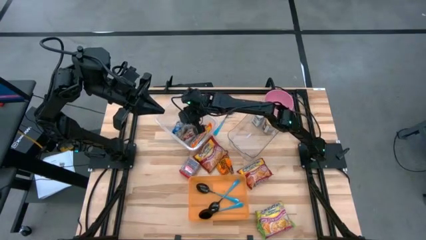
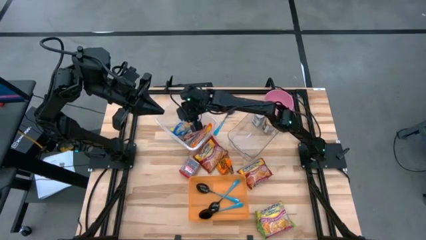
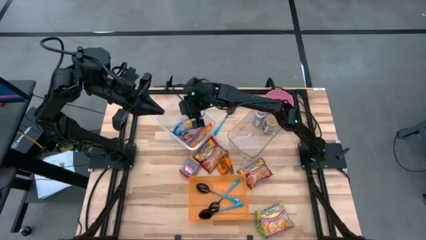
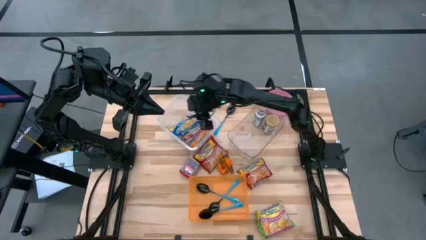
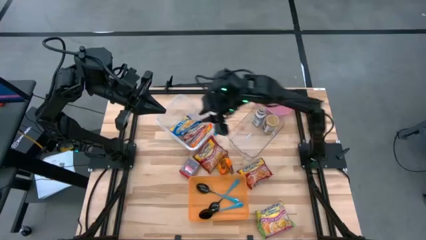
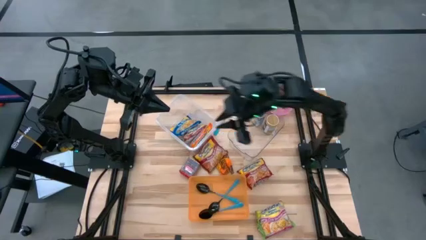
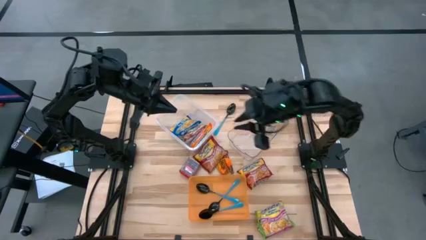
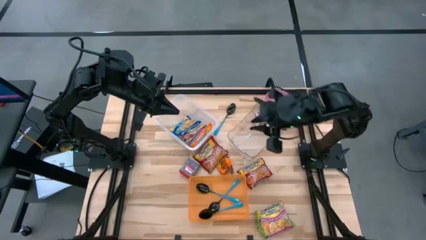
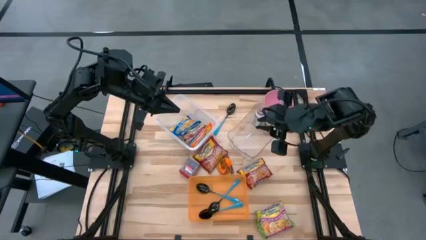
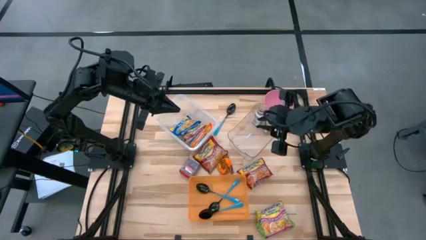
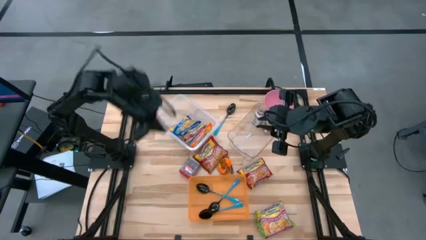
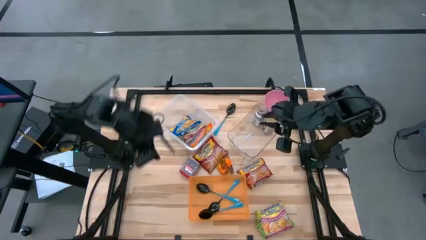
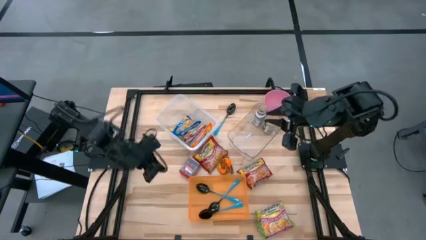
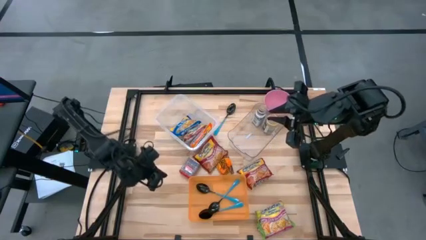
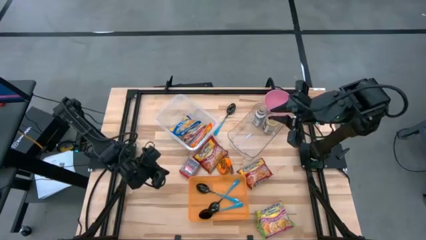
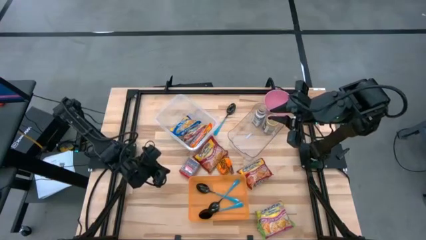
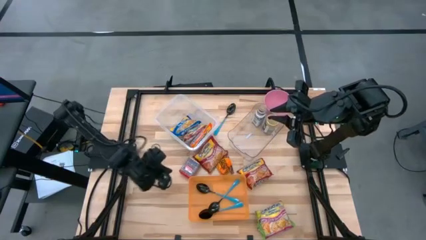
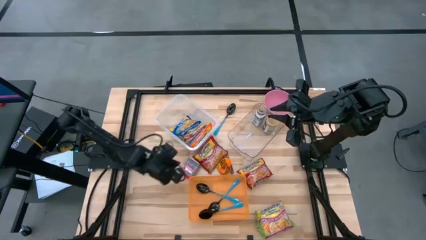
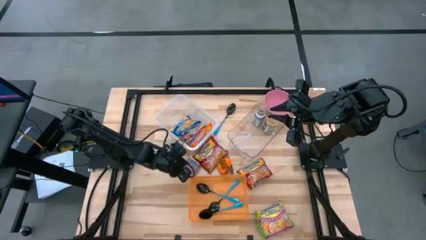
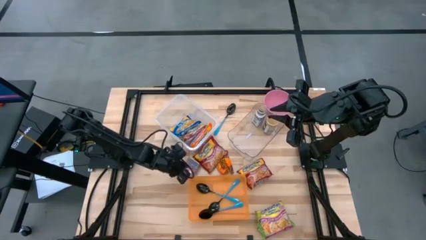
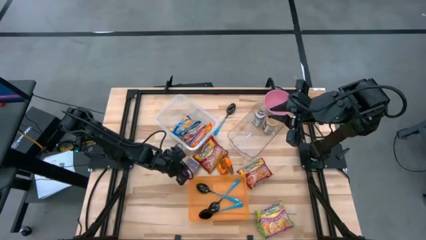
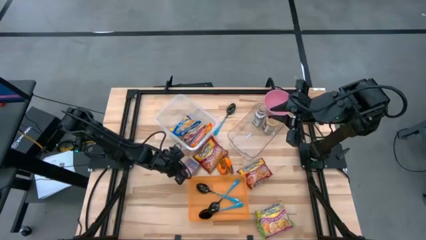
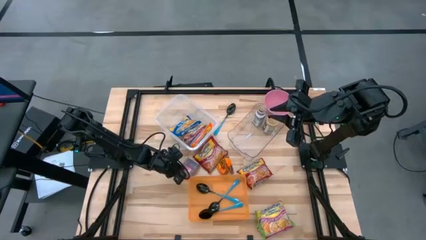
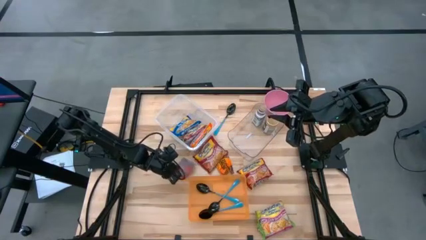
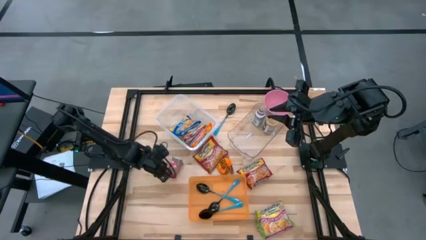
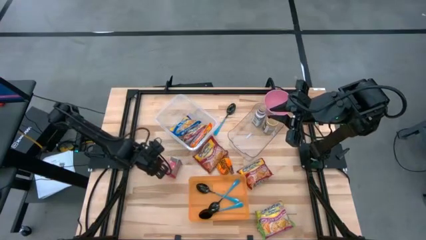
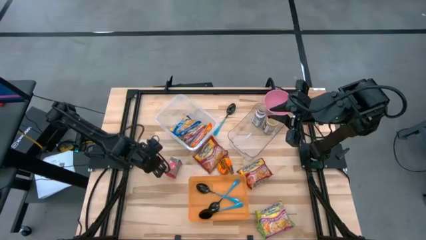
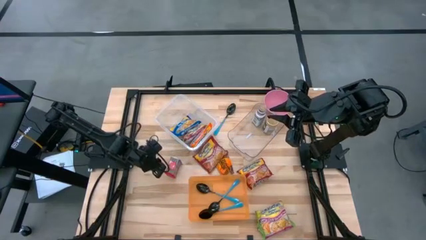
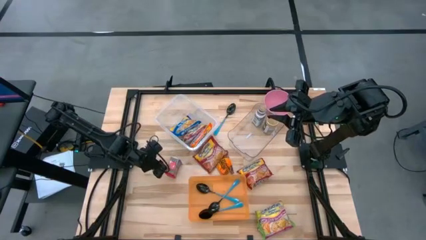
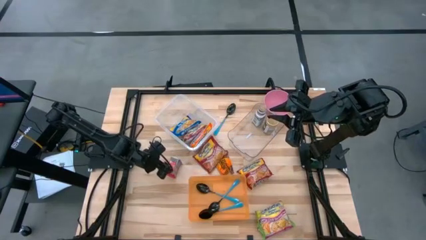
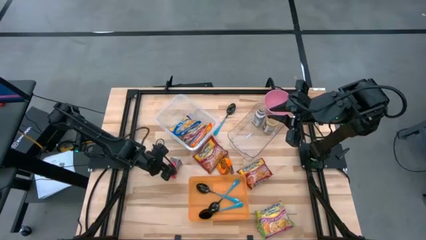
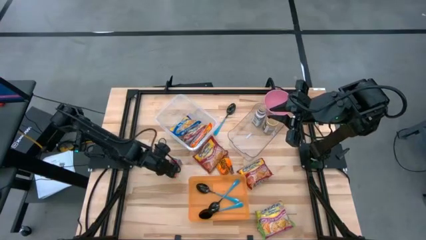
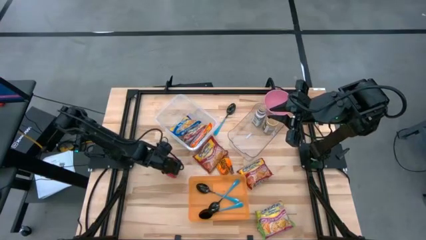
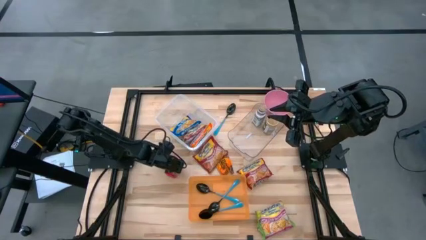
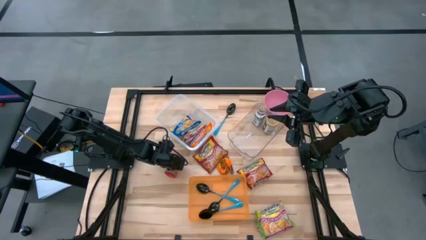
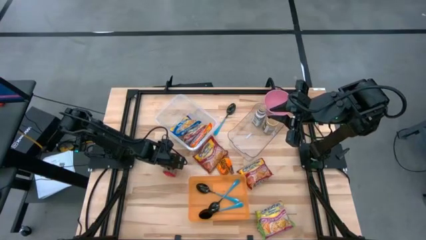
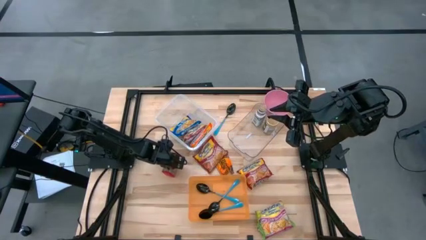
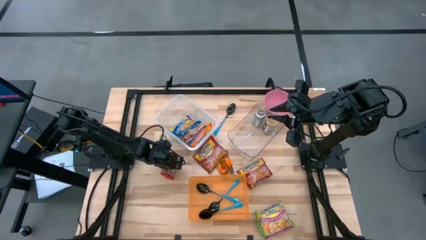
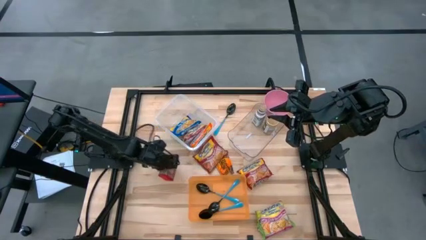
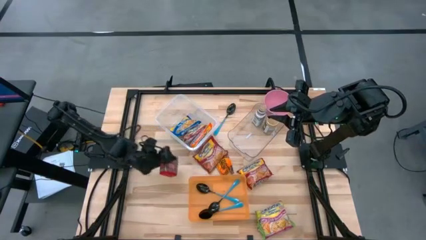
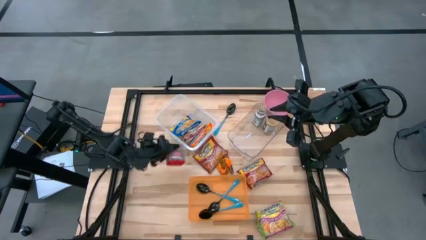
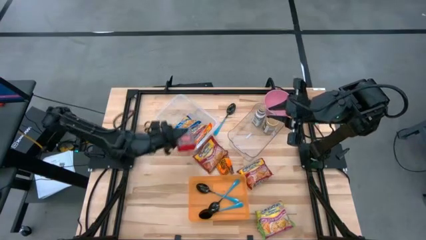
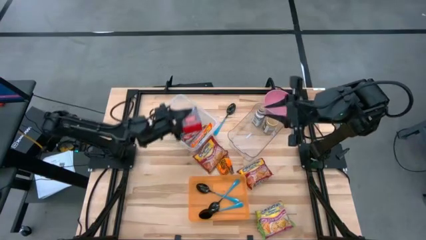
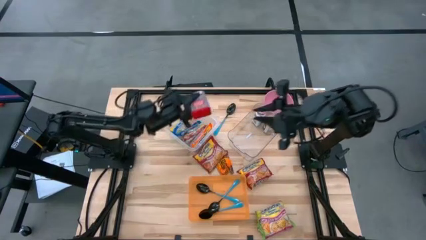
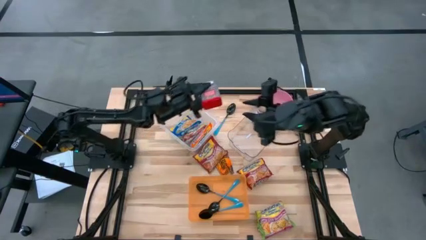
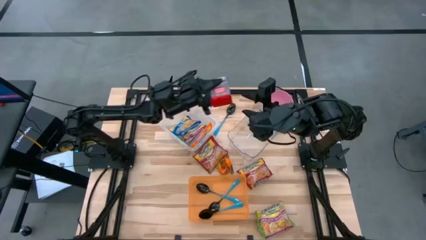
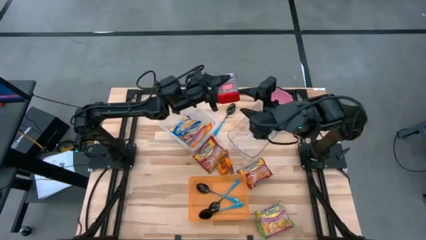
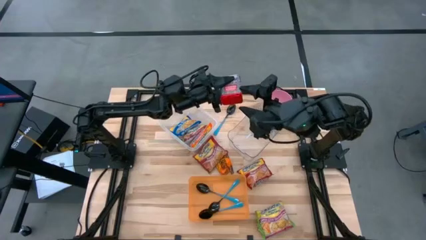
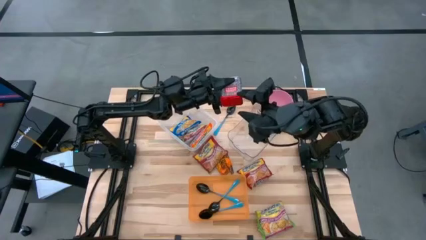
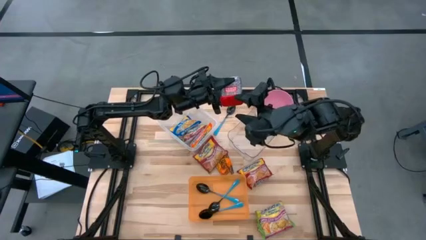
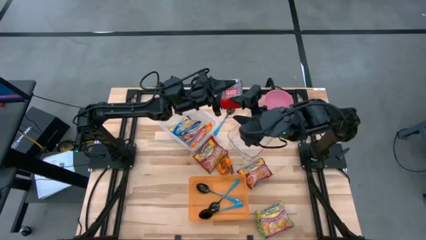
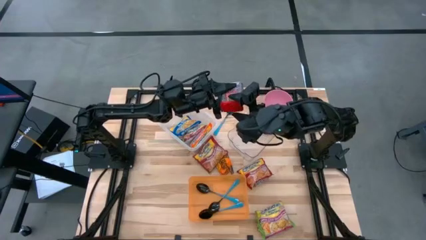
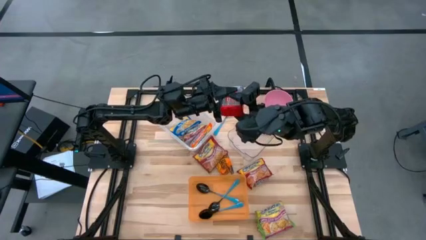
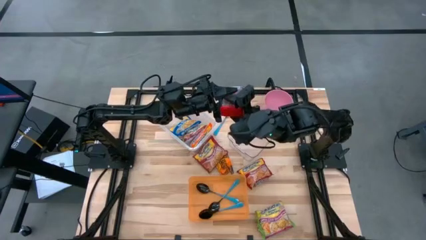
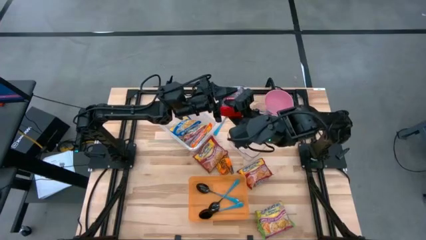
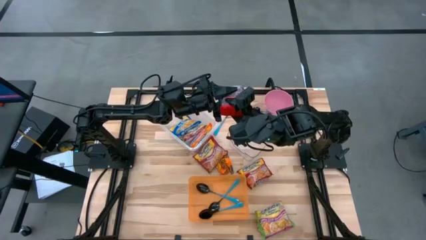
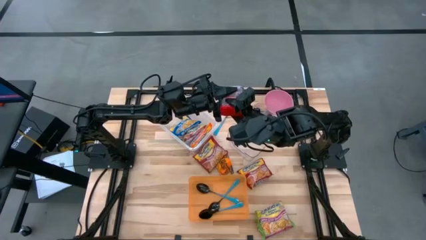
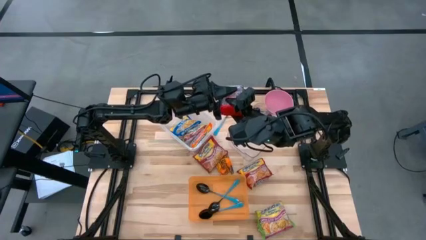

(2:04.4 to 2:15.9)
Task: Pick & Place Food Item
Put the red seasoning can into the transparent bin

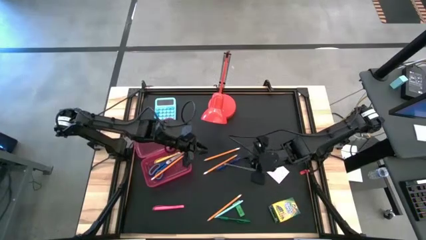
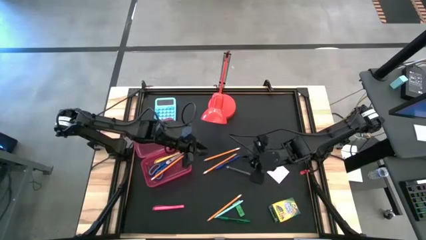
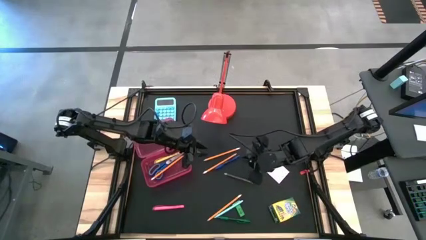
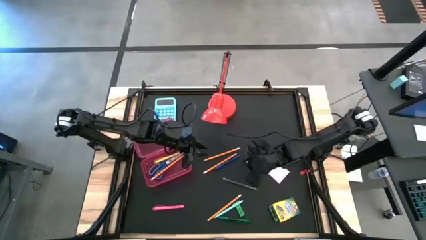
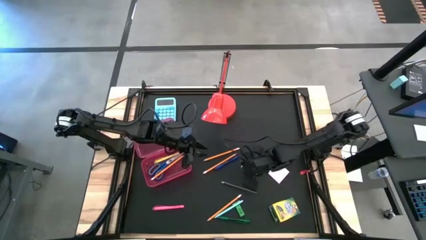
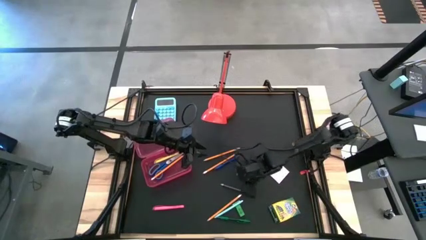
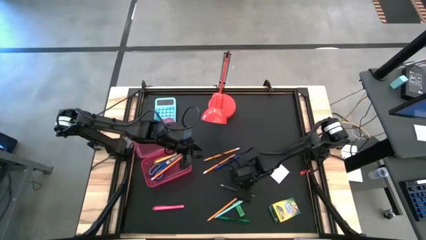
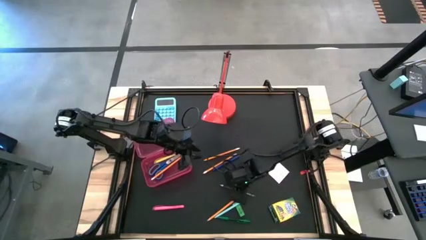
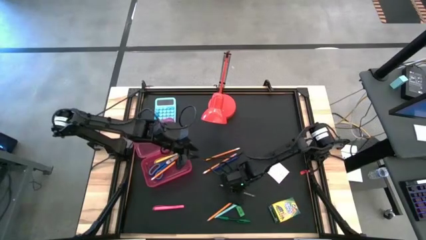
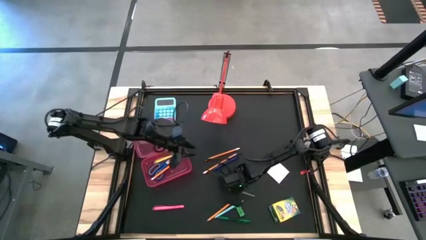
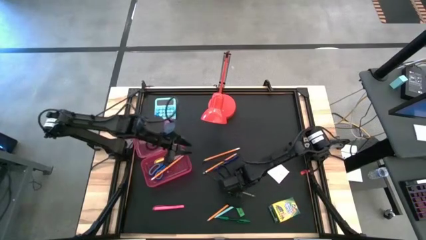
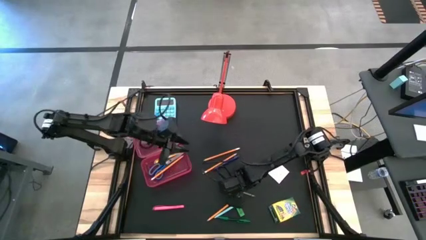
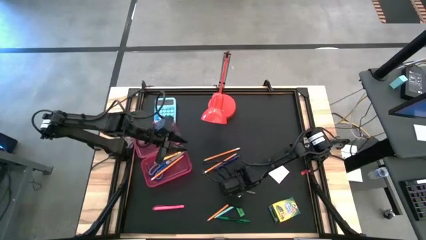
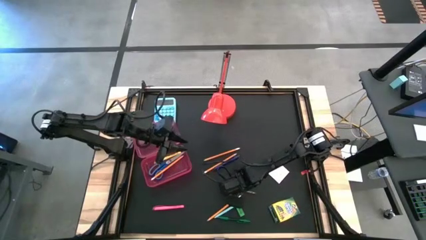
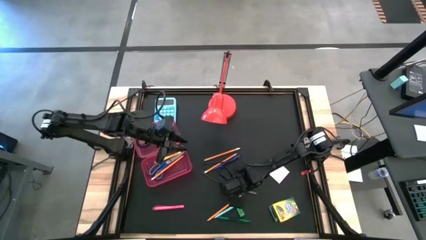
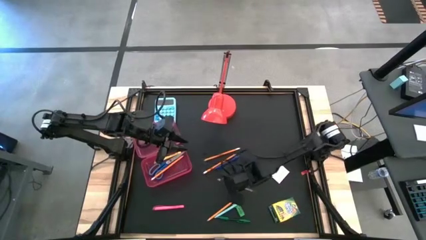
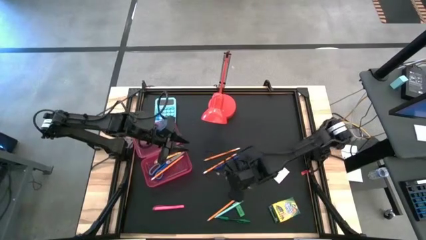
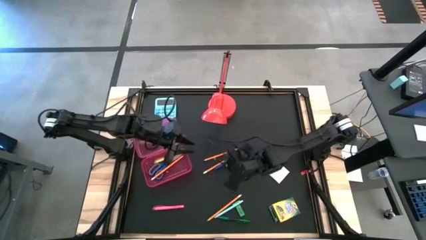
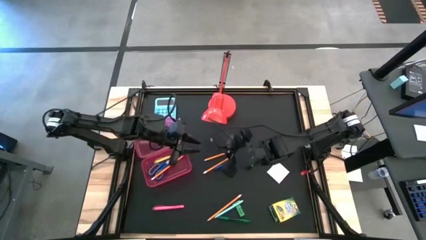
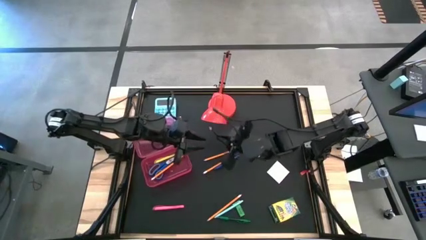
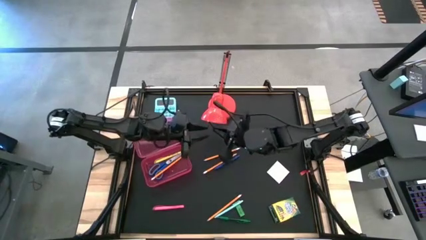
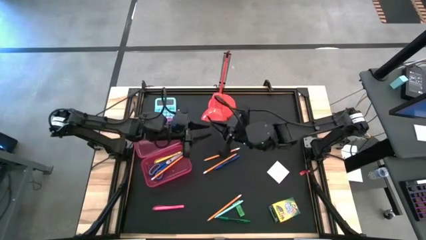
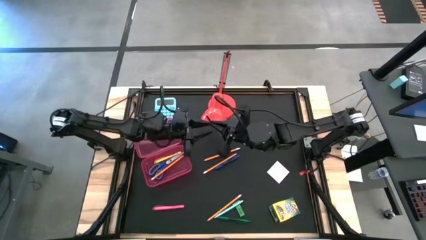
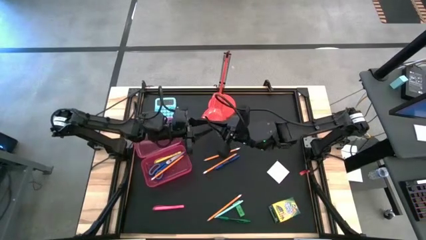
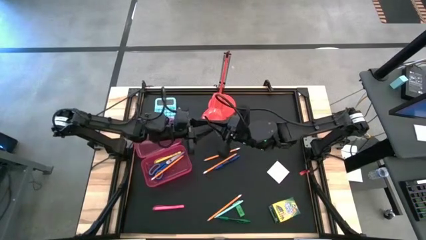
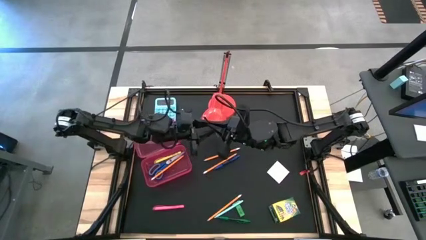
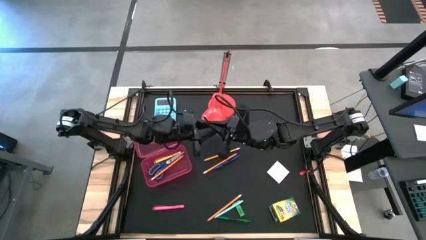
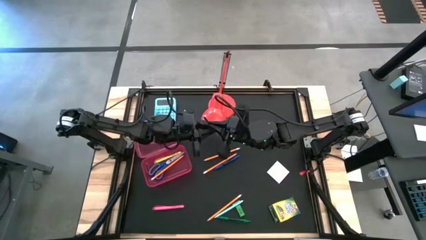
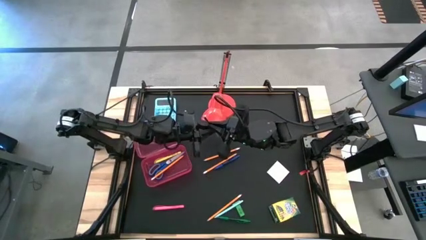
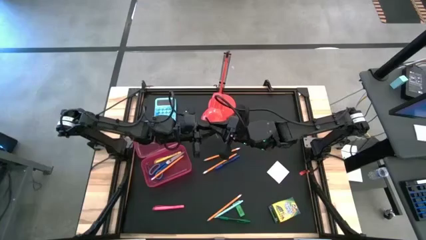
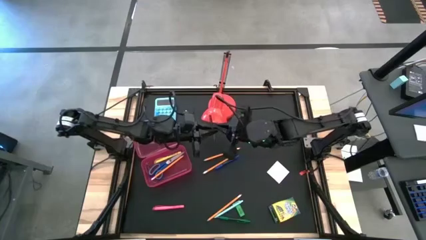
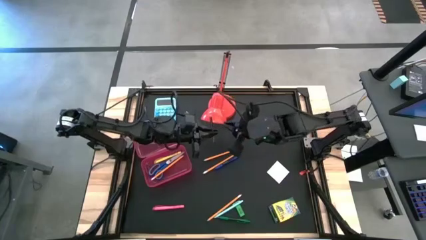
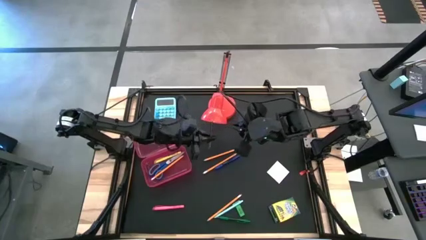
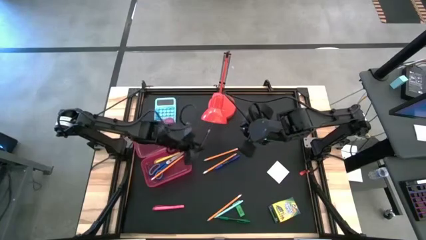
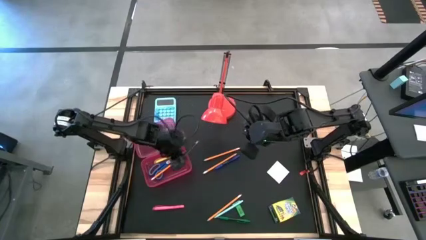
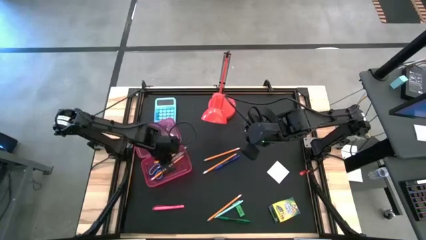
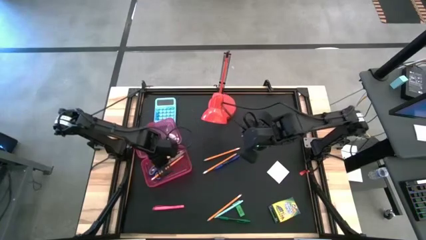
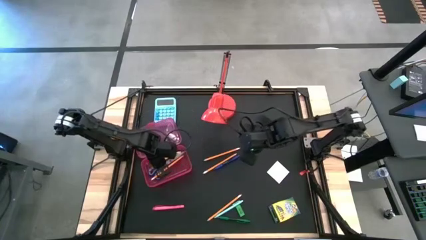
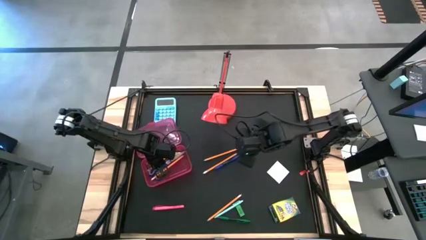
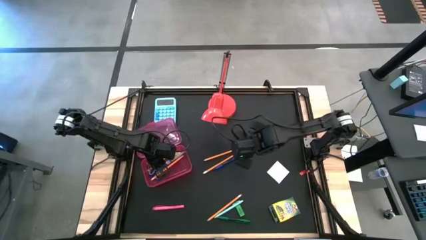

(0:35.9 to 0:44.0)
Task: Pack school essentials
Put the dark blue pencil into the red supply box
